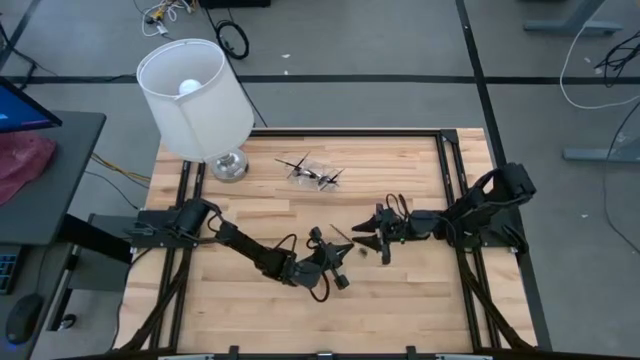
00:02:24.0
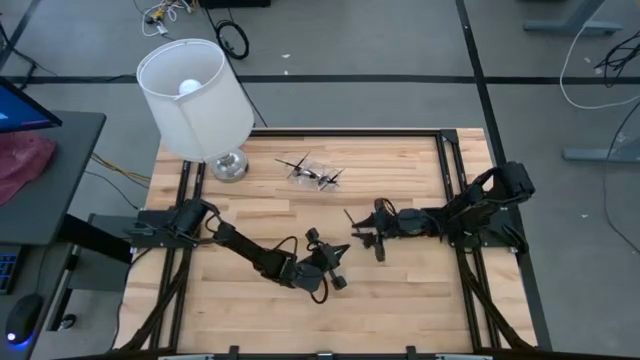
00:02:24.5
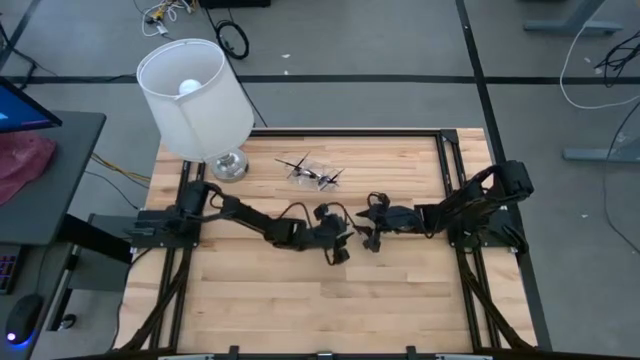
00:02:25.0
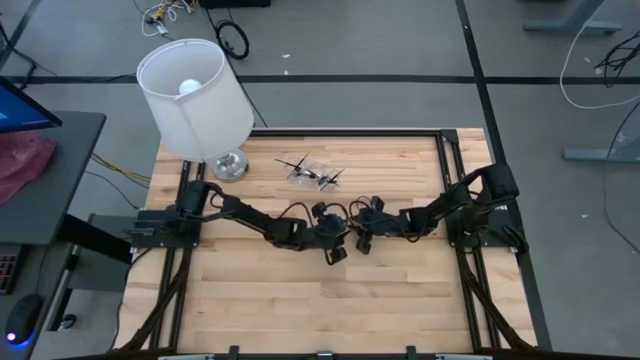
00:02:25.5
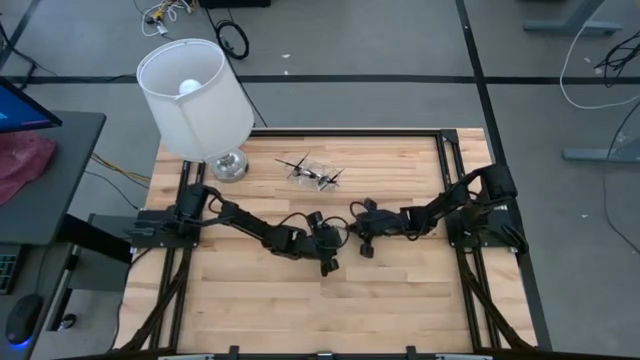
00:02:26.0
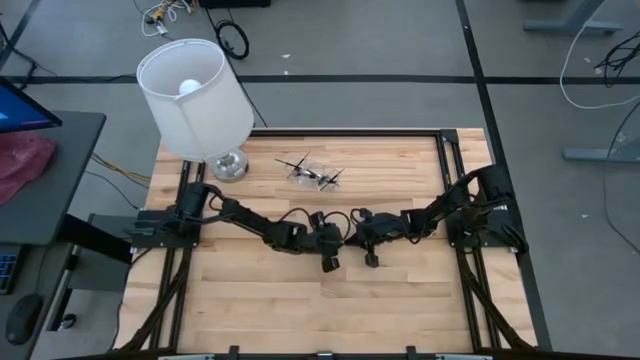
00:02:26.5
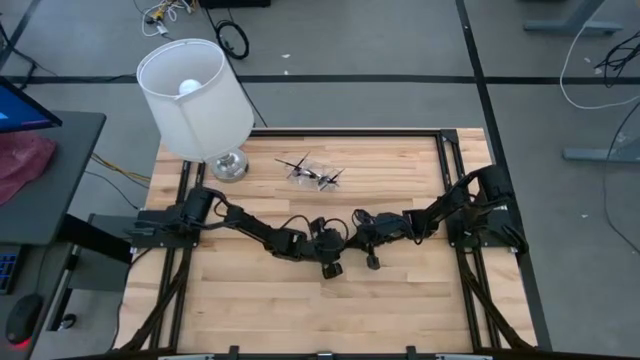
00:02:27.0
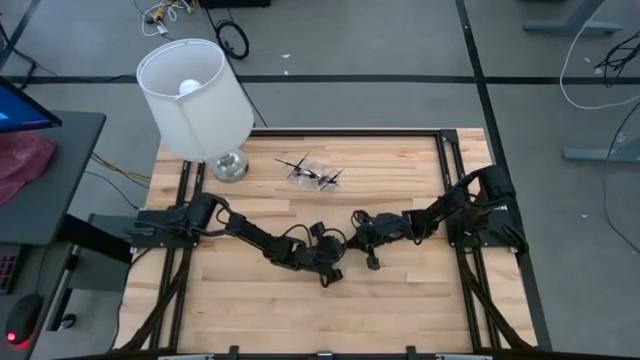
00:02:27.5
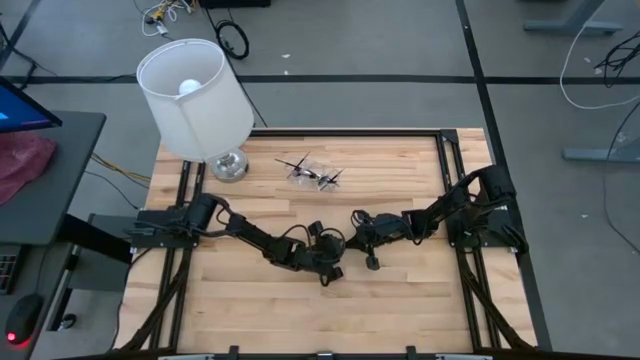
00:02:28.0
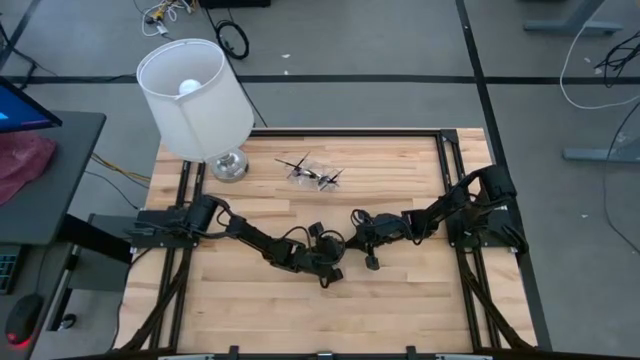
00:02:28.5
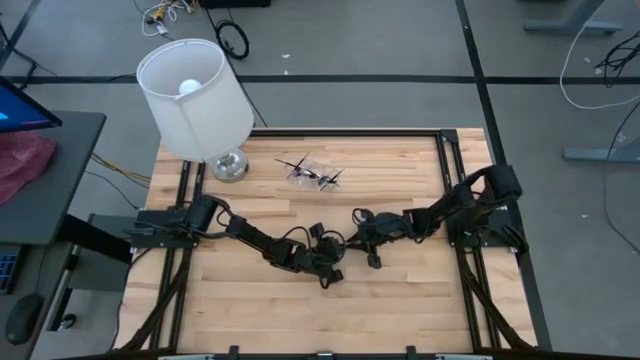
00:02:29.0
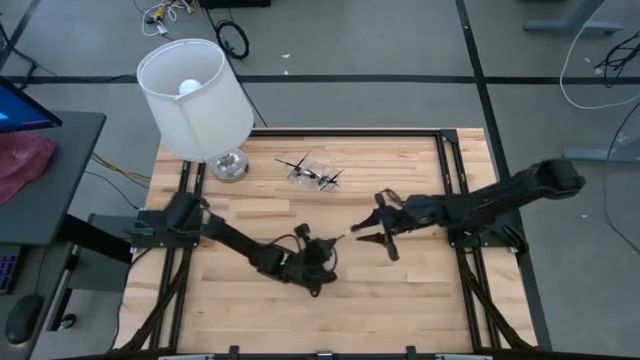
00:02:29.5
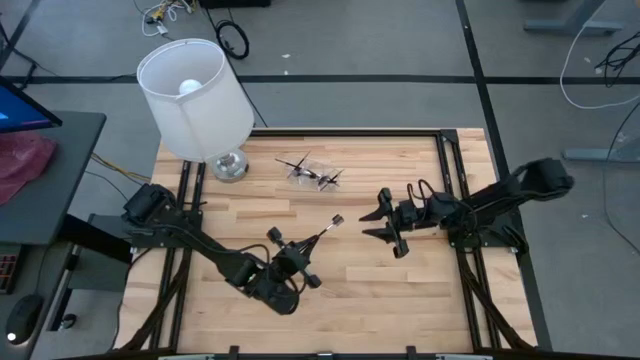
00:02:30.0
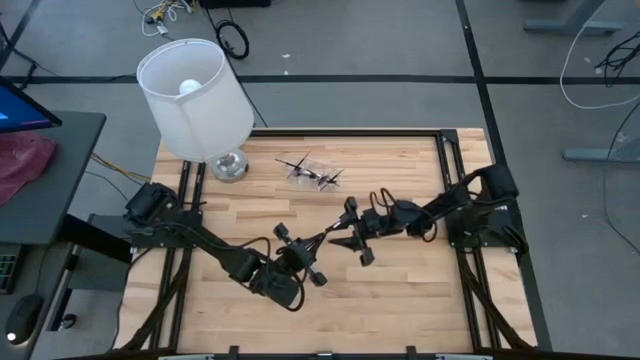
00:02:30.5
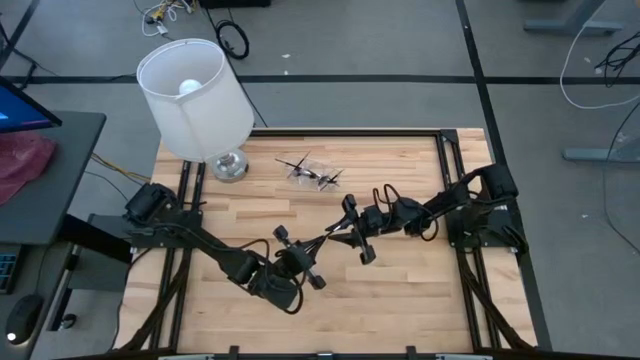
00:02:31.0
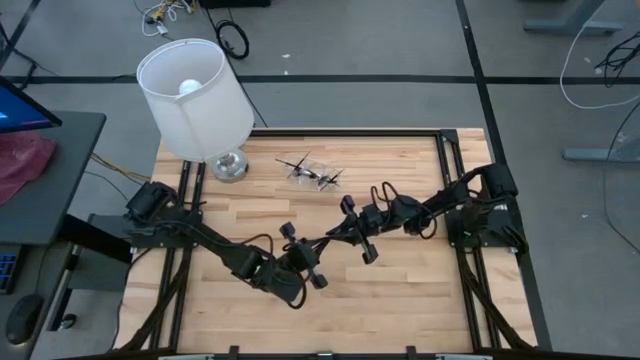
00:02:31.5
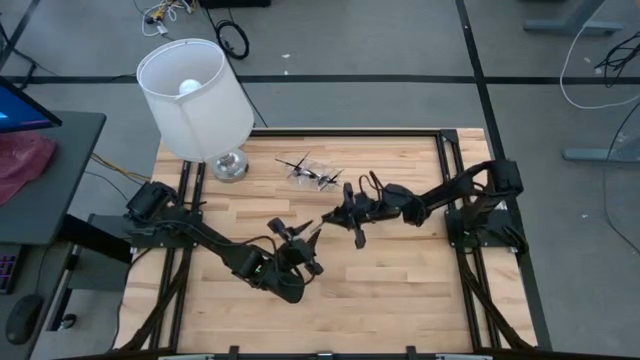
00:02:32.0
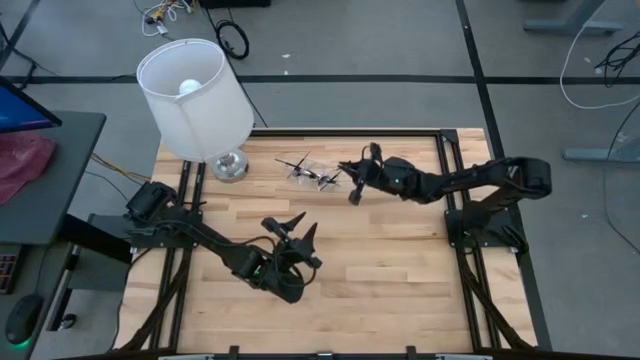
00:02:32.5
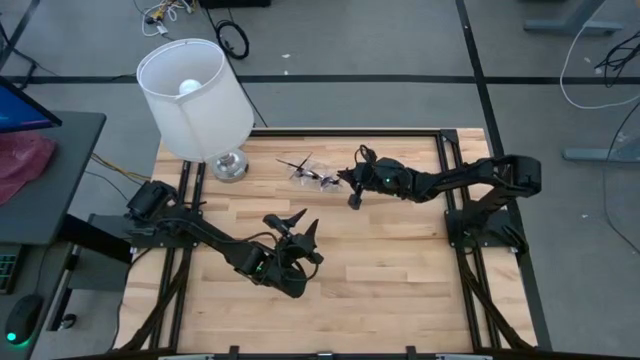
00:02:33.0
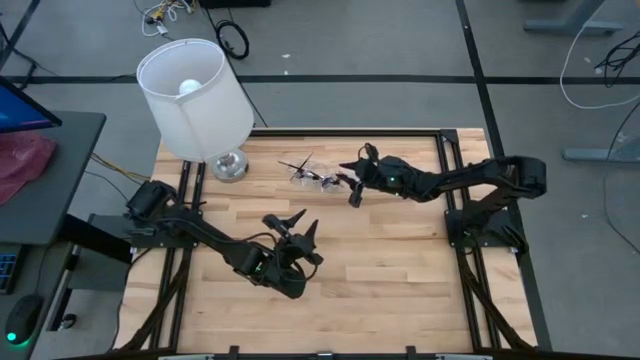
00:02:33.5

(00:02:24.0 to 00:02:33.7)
Task: Put items in baskets/containers
Put the black eyebrow brush into the transparent organizer

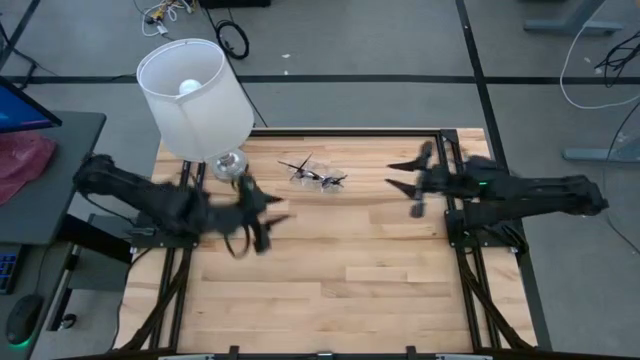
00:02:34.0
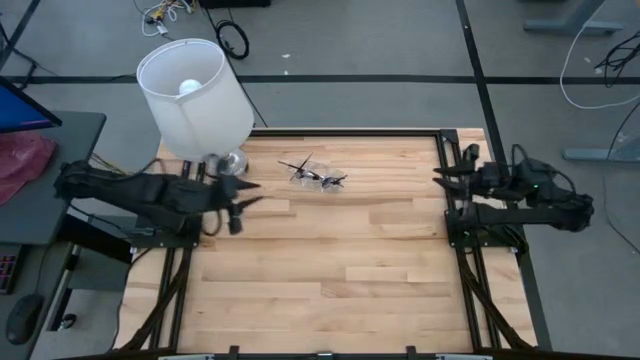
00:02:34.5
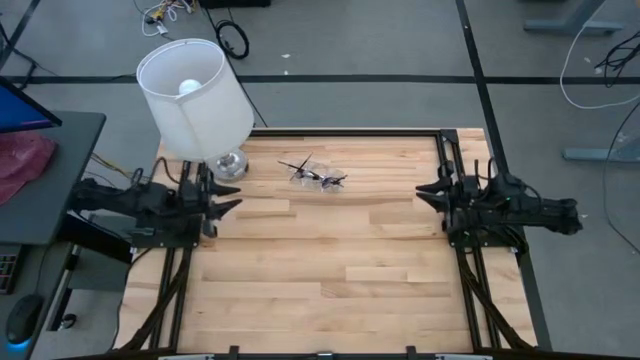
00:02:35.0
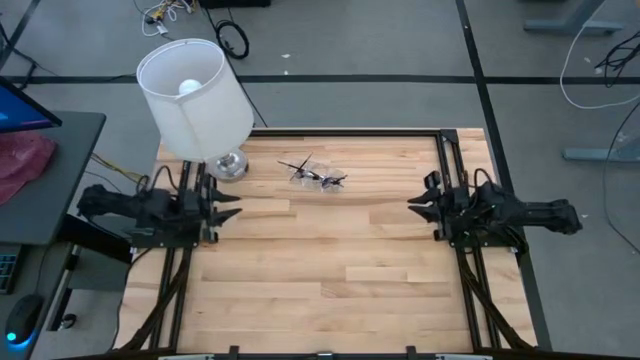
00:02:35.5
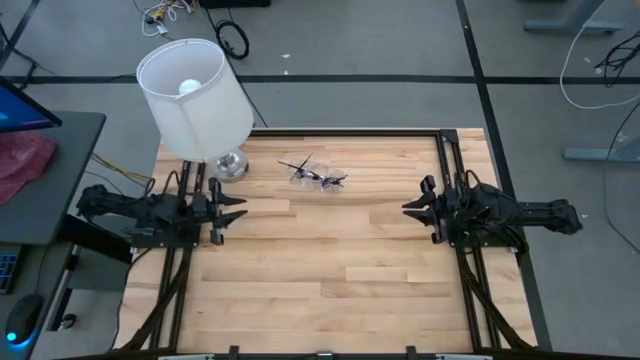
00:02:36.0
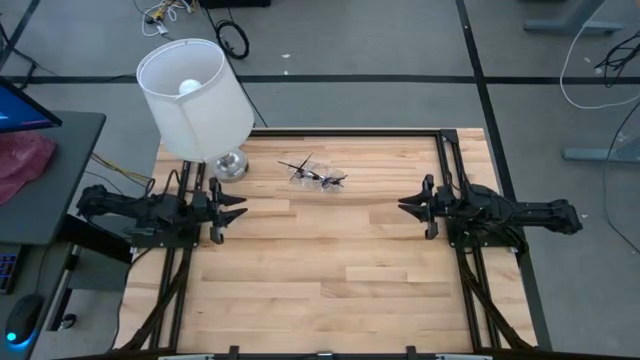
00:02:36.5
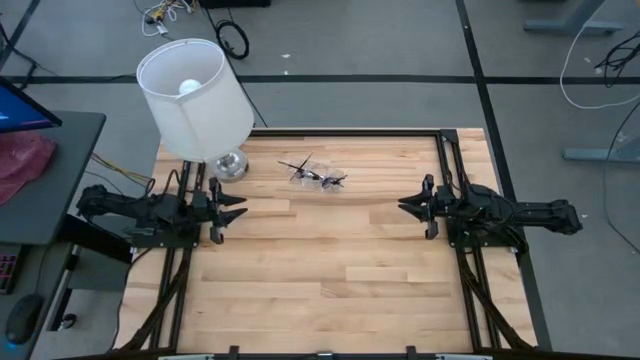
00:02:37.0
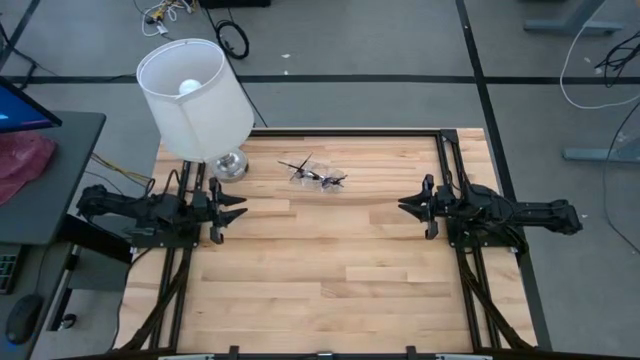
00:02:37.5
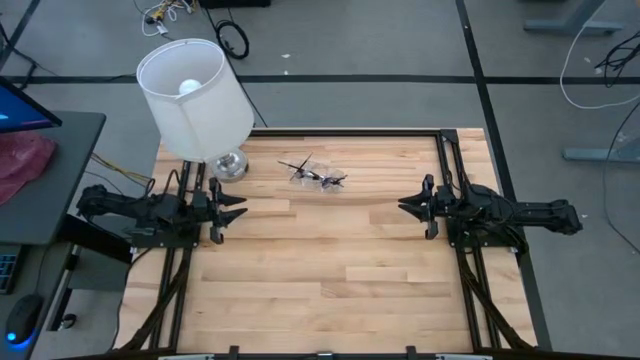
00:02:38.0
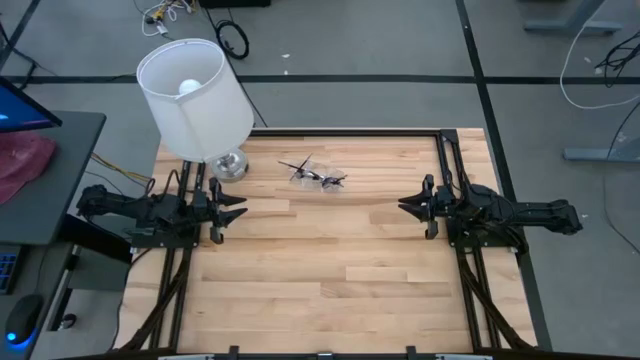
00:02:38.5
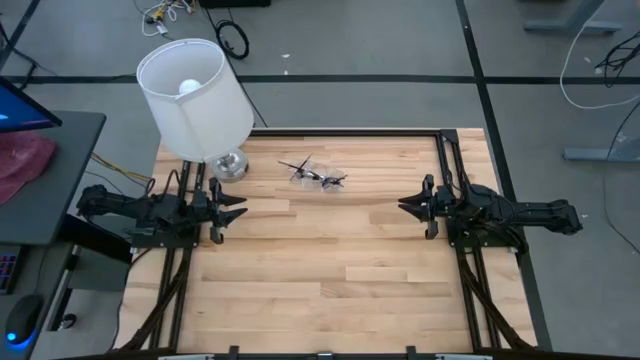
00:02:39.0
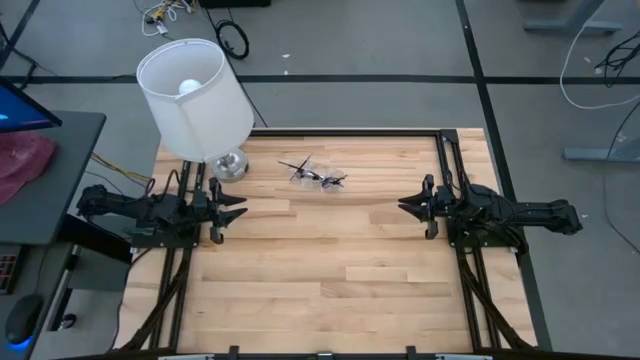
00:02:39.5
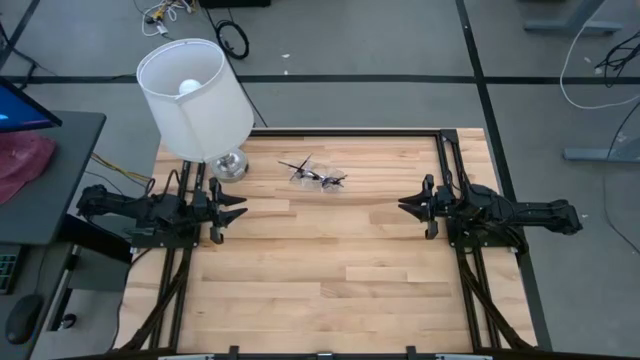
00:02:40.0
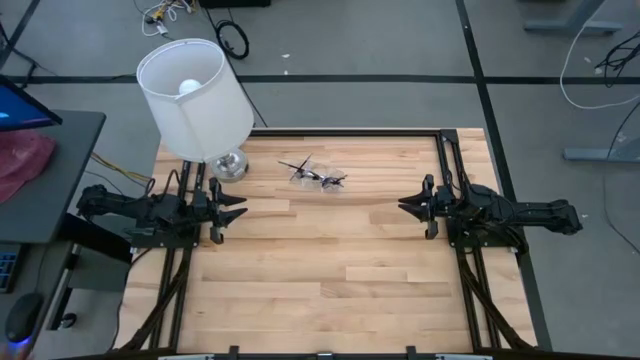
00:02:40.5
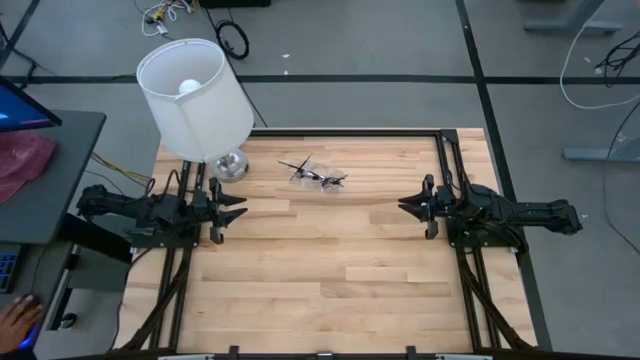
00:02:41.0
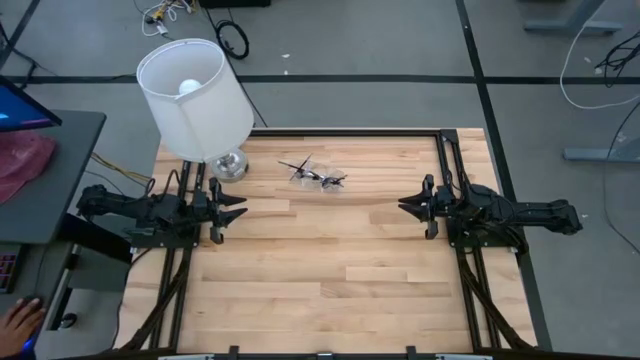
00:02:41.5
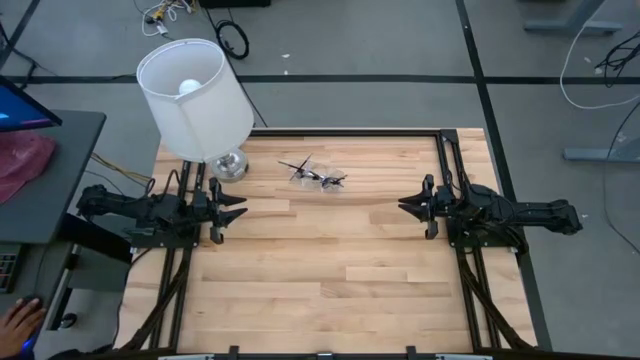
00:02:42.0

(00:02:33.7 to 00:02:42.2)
Return to Home Position

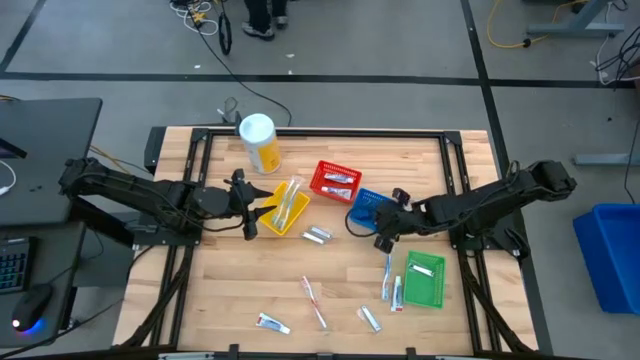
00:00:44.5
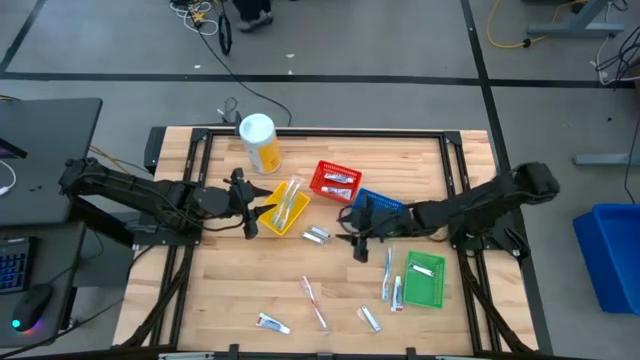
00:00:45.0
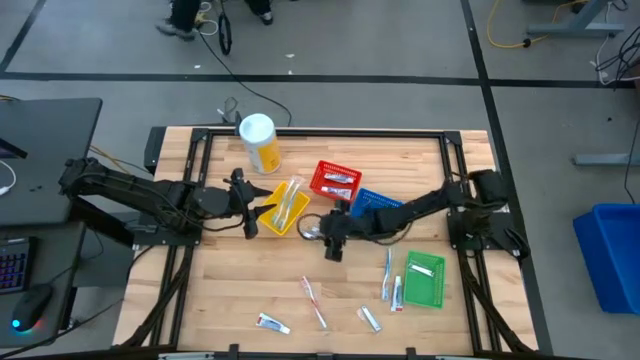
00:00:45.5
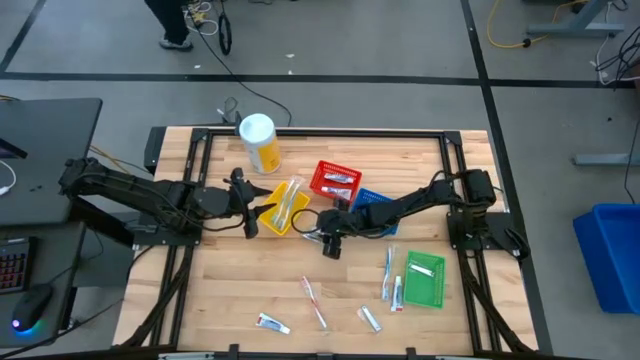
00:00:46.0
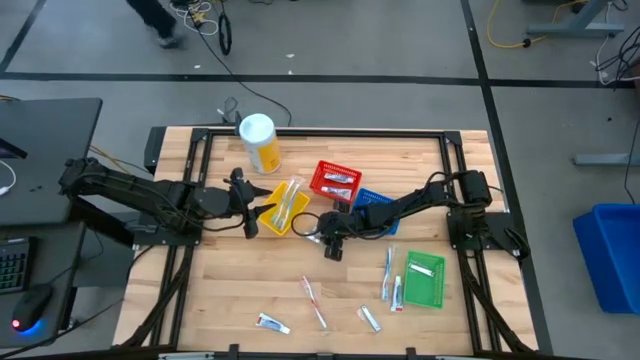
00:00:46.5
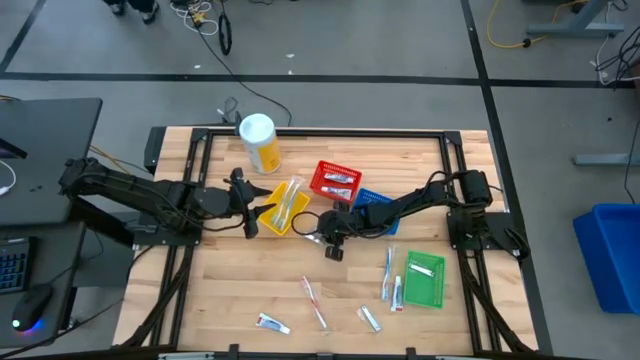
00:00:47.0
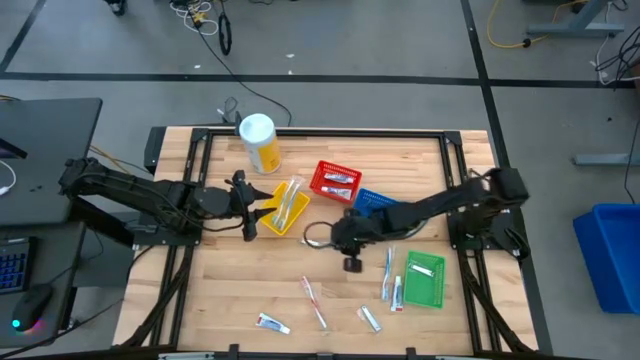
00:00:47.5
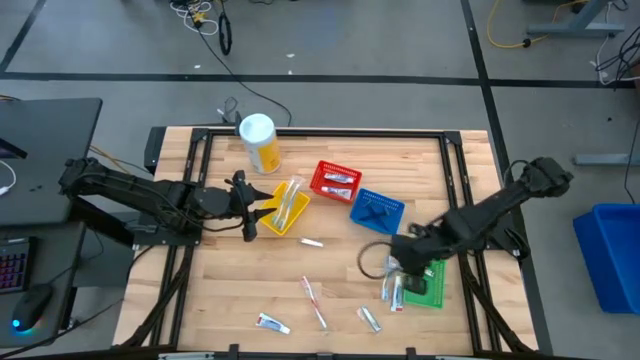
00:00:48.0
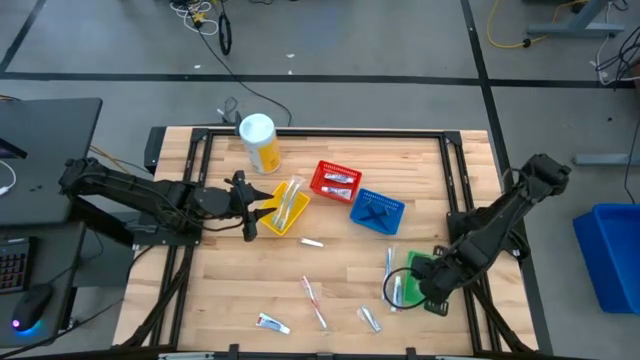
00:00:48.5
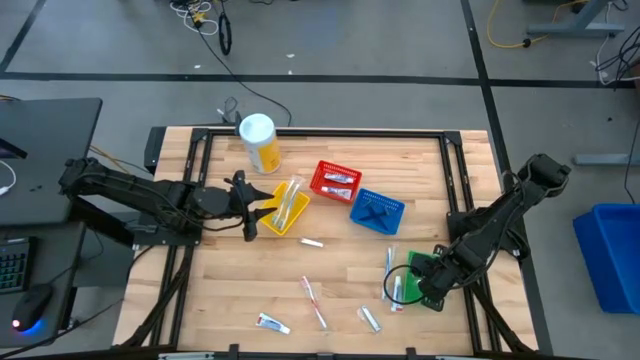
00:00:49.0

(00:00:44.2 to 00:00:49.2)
Task: Pick & Place Travel size toiletries
Put the silver nail cutter into the green bin
